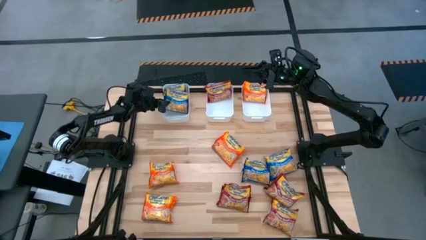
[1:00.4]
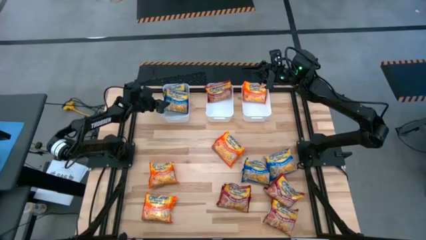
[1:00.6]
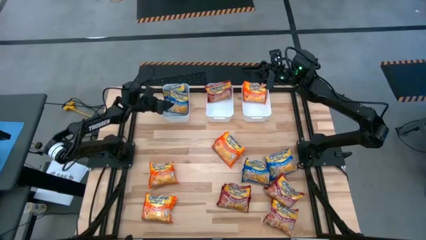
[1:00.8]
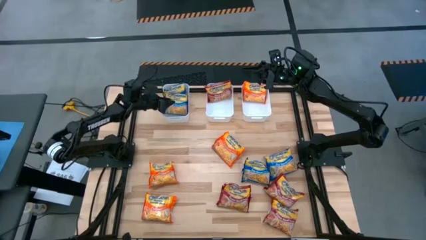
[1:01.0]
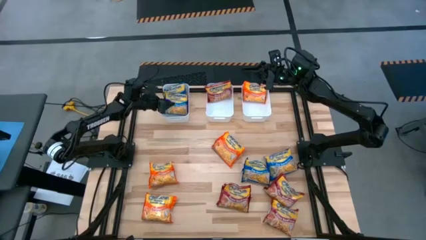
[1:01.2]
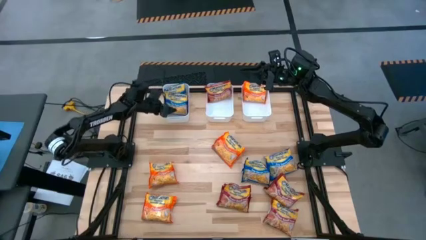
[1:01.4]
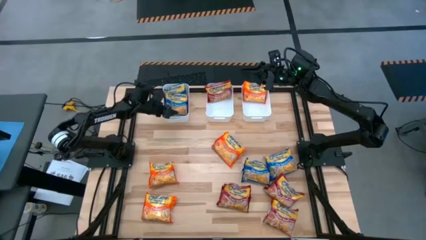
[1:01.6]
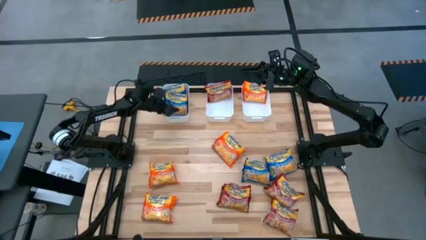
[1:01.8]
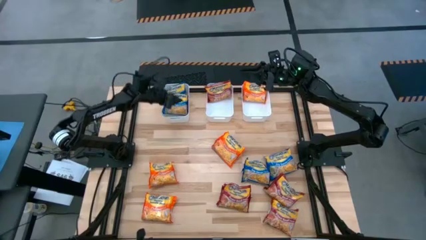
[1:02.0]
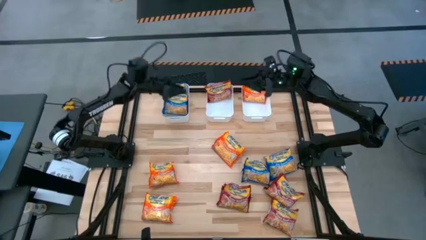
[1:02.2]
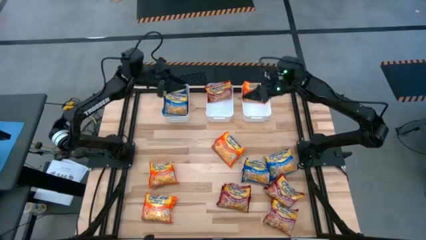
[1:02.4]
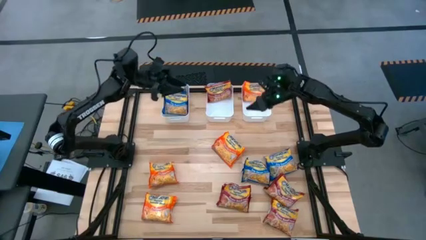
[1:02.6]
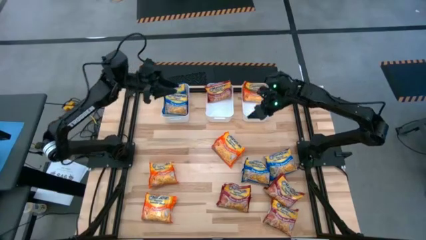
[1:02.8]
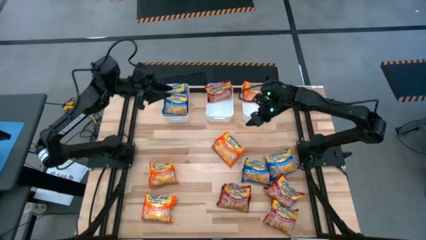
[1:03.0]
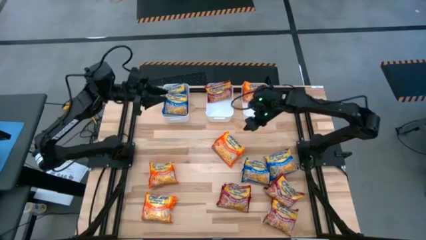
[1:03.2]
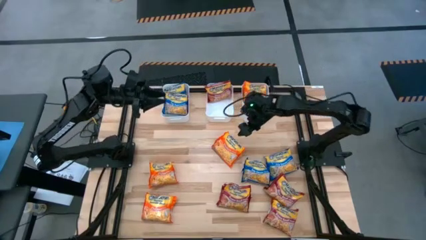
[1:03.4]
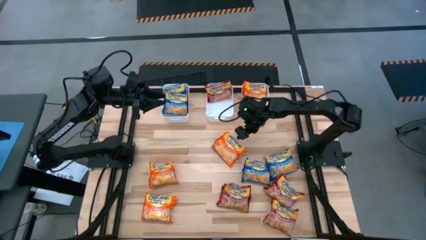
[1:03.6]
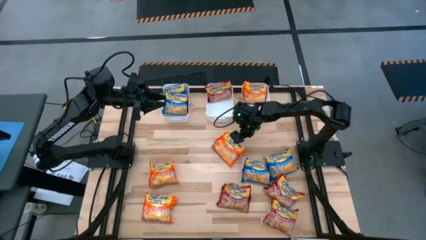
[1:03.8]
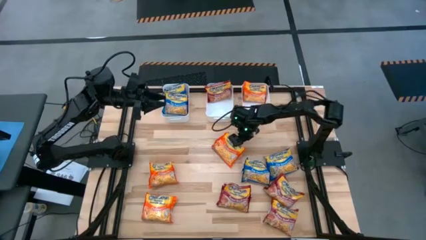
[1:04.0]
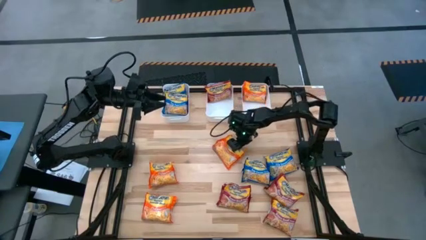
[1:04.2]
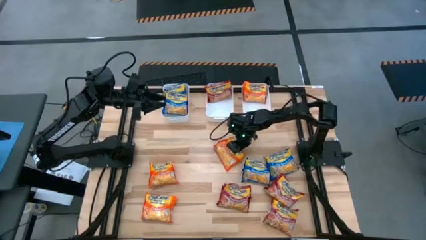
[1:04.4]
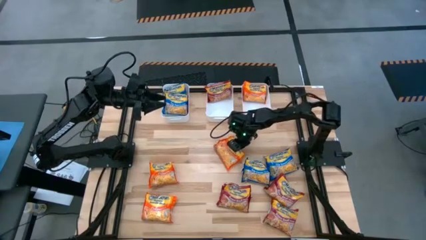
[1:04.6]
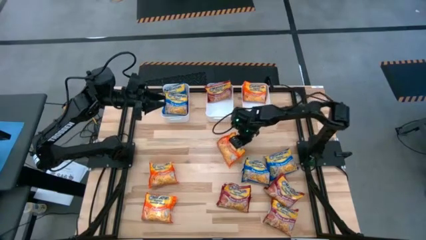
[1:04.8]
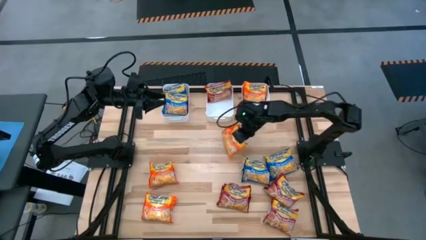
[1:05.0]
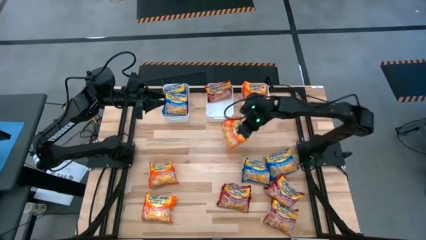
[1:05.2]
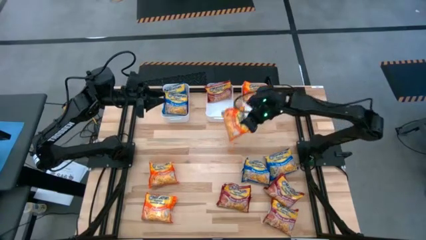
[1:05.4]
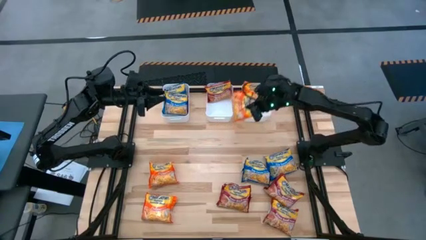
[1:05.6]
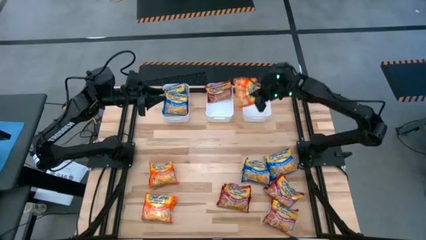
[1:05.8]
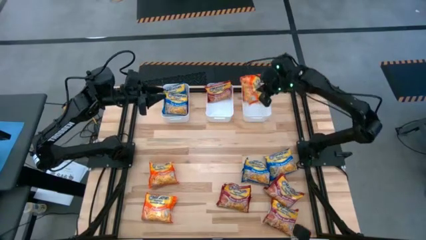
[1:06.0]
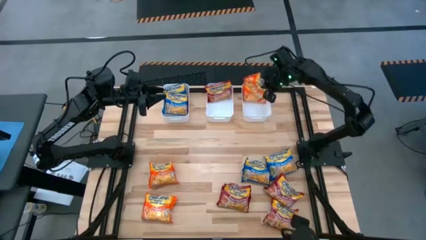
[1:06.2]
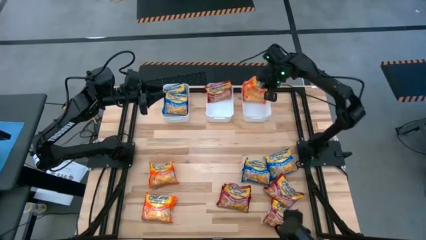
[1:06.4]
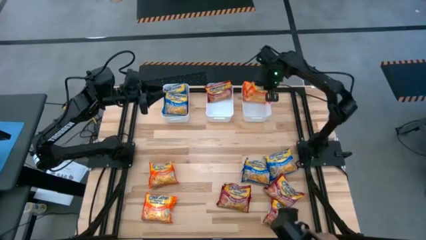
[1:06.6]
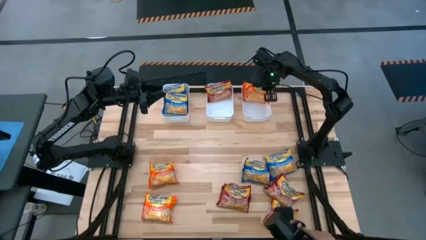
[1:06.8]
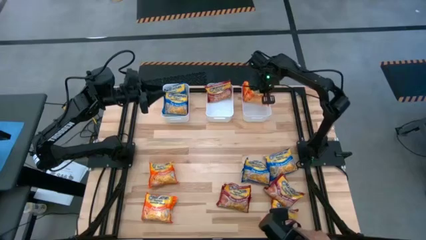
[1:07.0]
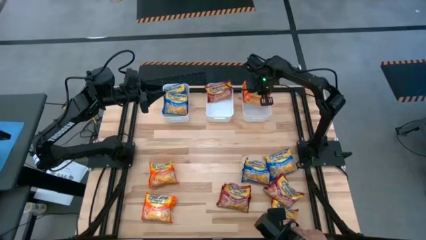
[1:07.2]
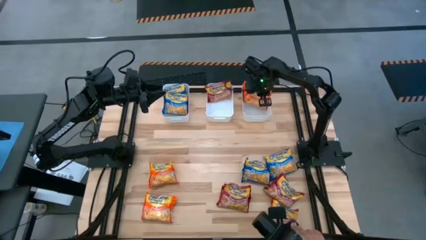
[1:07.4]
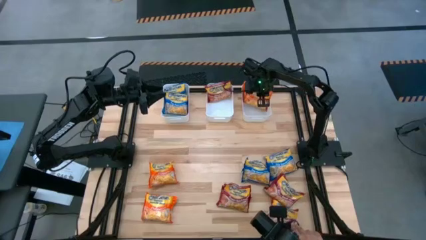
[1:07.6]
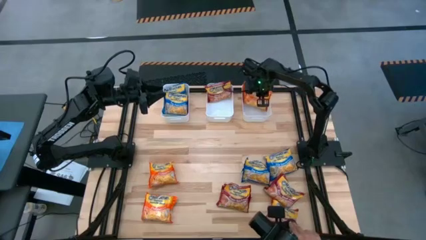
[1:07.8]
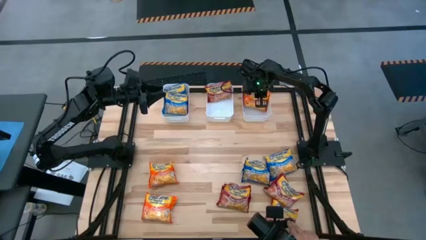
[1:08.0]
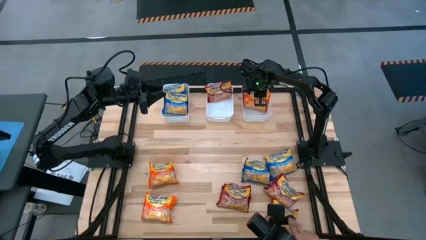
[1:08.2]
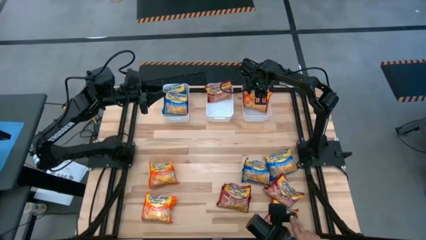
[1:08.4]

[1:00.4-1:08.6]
Task: Sort Maruchan noodles
Put the orange noodle pack into the right white bin
